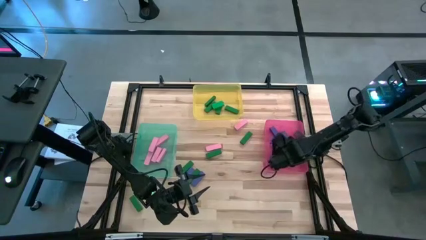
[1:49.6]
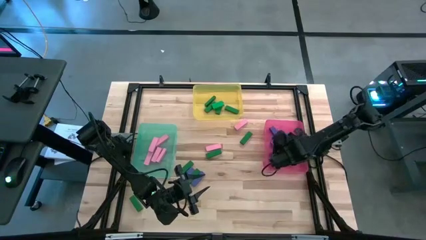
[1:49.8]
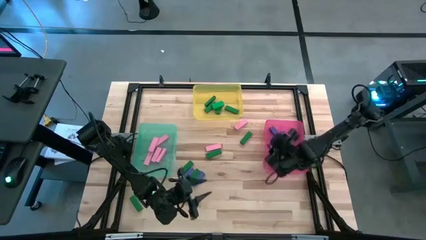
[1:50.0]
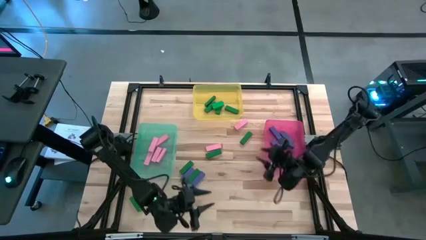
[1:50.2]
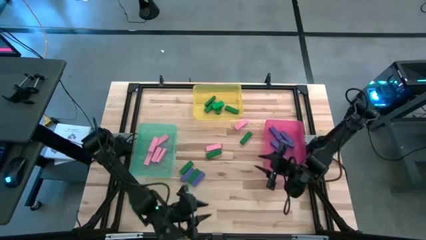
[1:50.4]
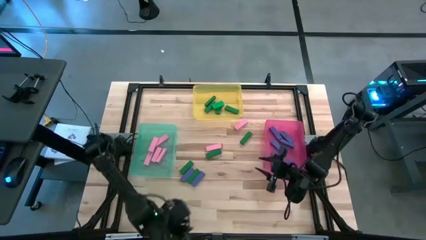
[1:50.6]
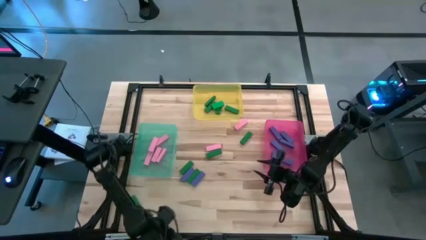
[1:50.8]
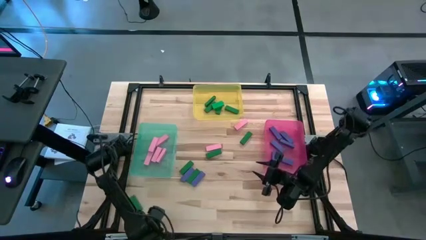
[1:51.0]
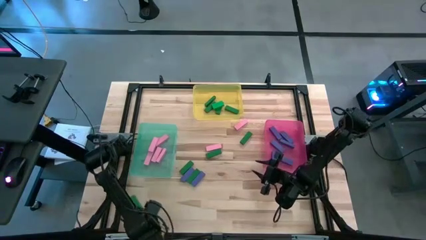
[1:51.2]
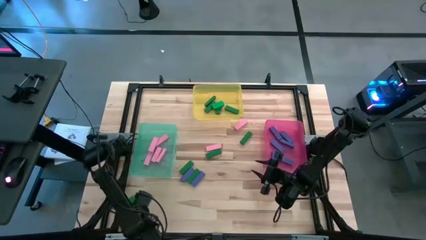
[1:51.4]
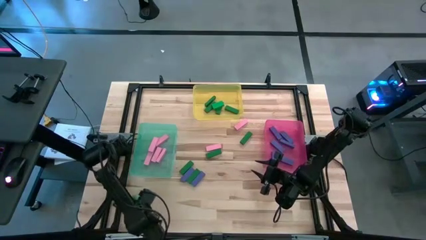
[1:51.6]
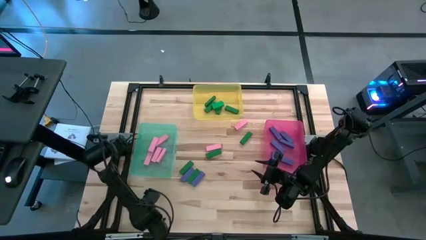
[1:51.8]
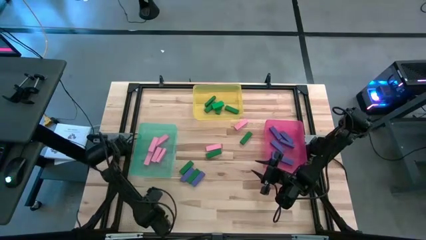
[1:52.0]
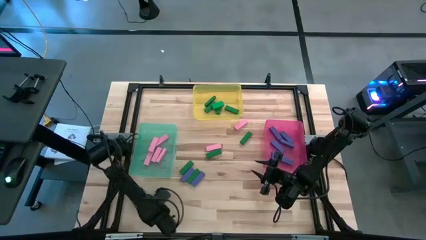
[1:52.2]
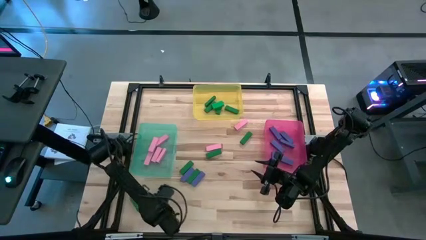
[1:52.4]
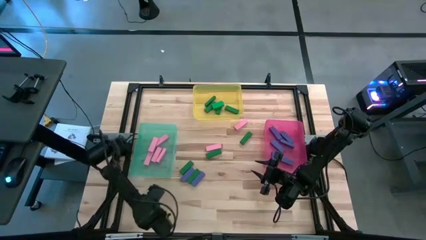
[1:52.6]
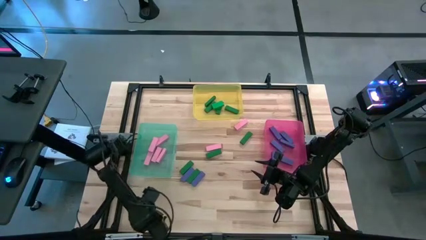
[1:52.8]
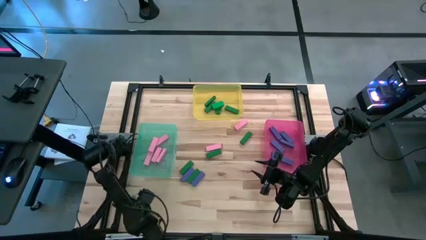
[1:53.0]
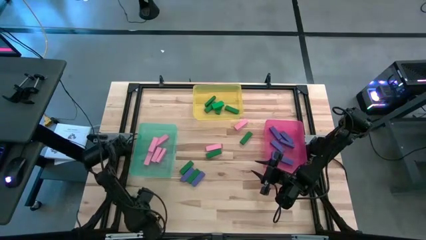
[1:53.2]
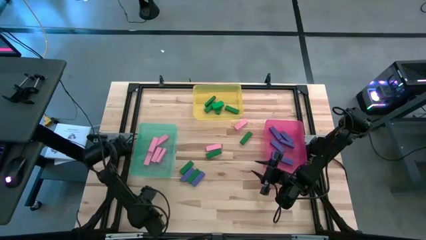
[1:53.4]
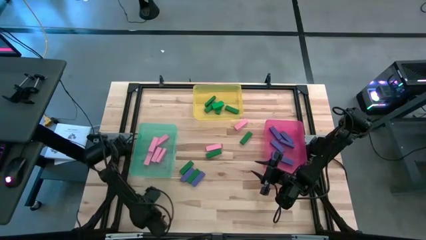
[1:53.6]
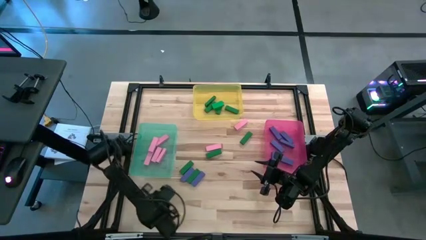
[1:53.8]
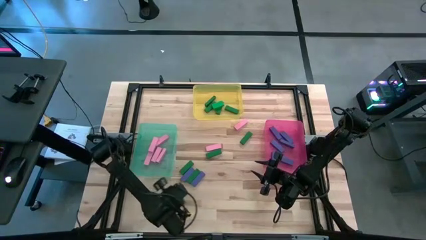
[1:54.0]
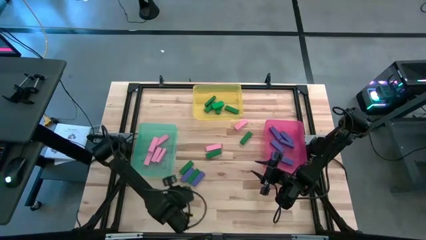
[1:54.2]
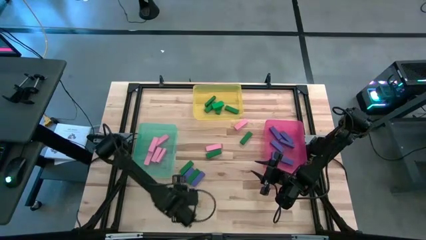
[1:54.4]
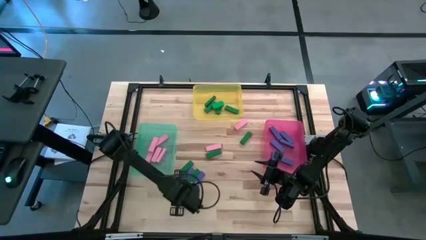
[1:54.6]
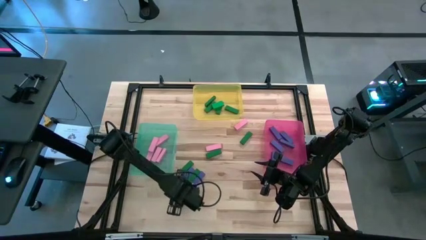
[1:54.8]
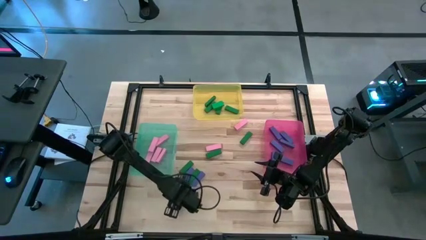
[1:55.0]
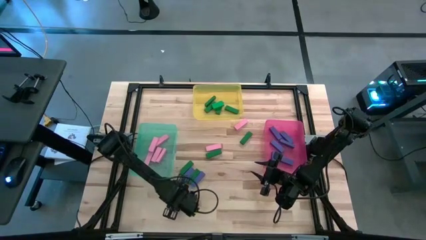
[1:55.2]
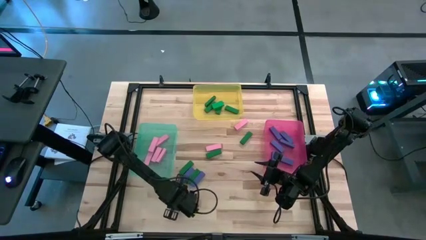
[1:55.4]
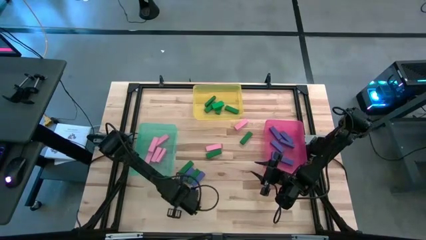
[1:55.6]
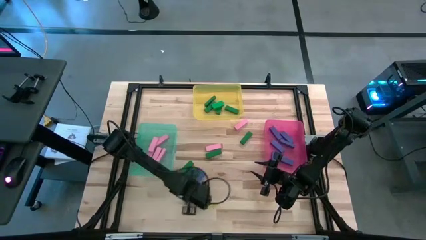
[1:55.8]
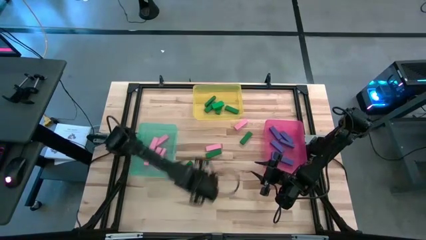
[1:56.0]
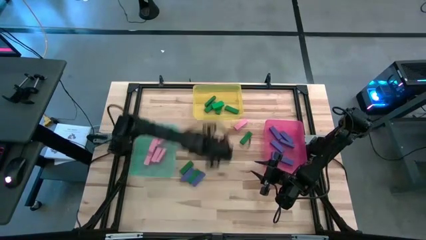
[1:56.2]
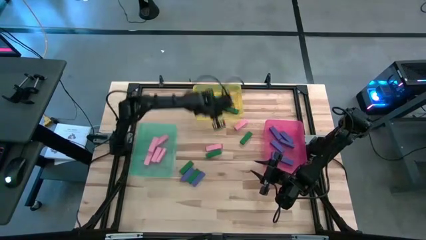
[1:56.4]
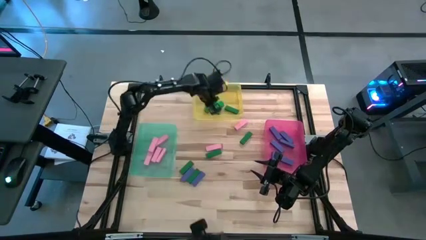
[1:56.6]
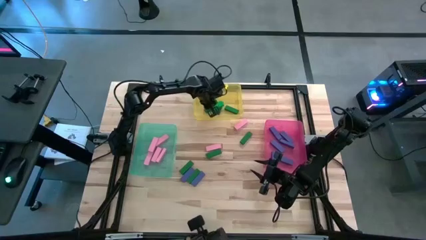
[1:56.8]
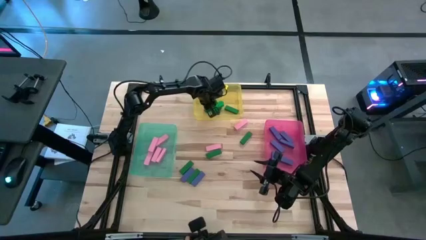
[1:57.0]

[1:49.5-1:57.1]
Task: Sort blocks
Put the green block into the yellow bin

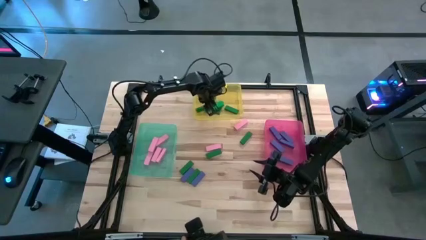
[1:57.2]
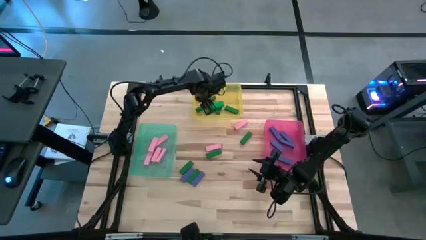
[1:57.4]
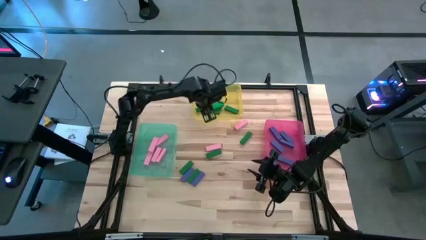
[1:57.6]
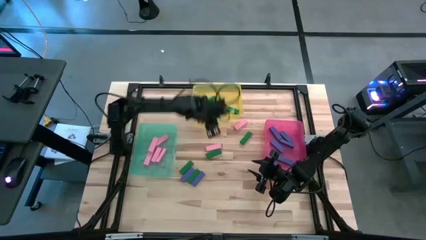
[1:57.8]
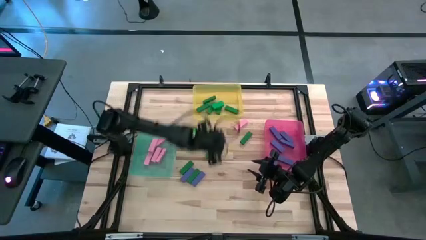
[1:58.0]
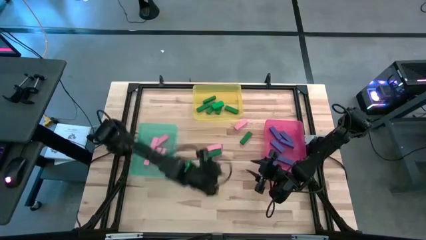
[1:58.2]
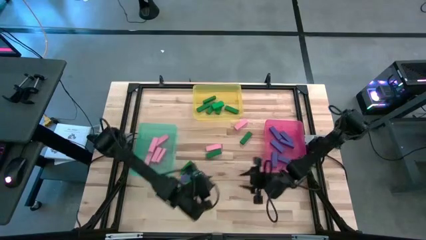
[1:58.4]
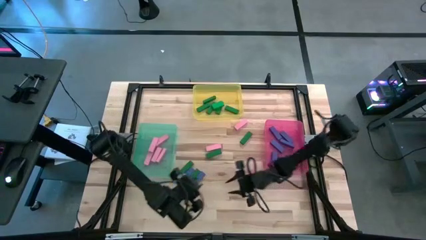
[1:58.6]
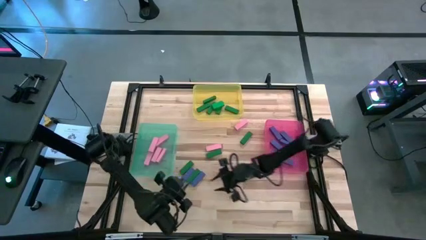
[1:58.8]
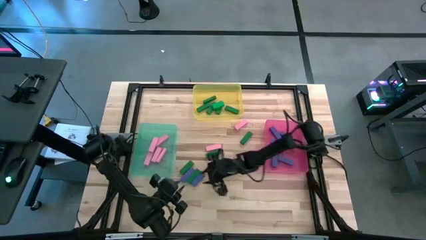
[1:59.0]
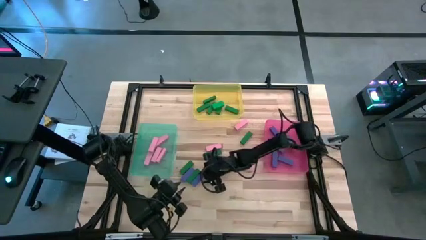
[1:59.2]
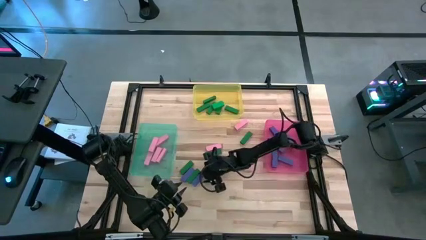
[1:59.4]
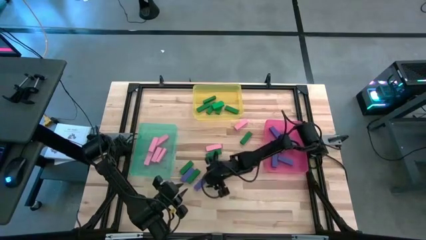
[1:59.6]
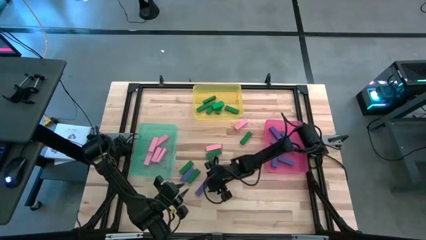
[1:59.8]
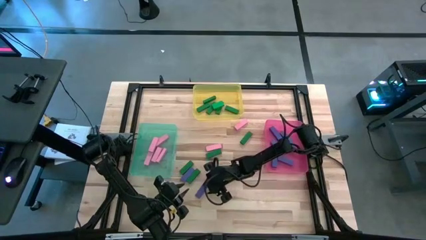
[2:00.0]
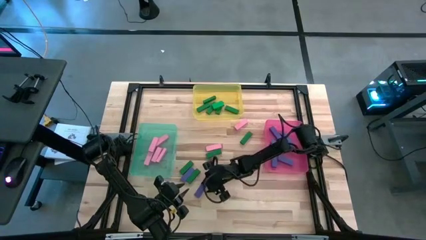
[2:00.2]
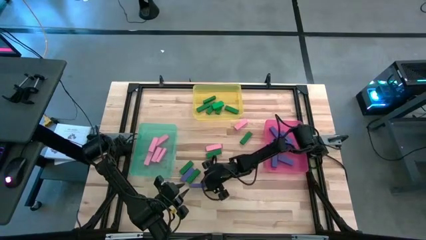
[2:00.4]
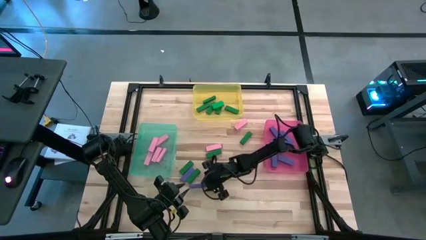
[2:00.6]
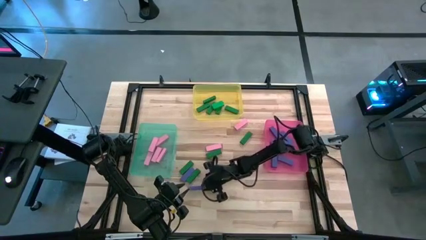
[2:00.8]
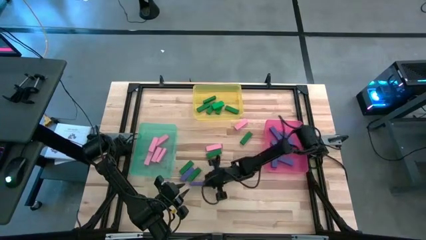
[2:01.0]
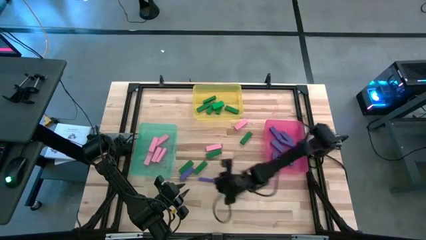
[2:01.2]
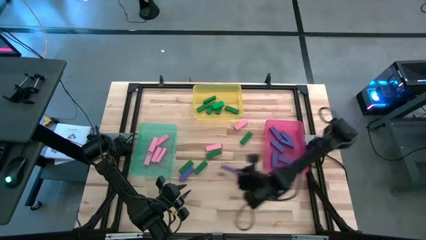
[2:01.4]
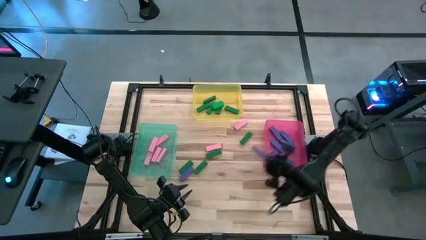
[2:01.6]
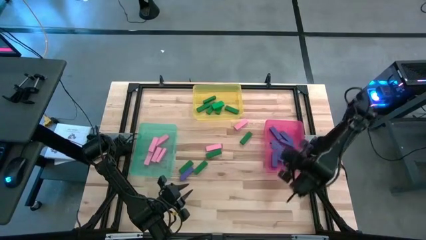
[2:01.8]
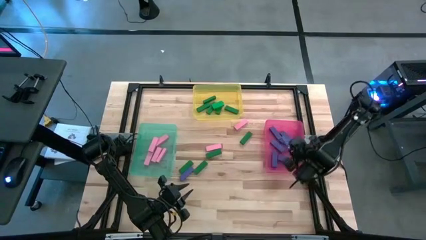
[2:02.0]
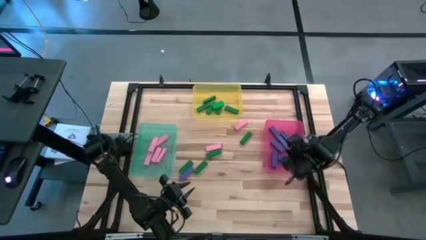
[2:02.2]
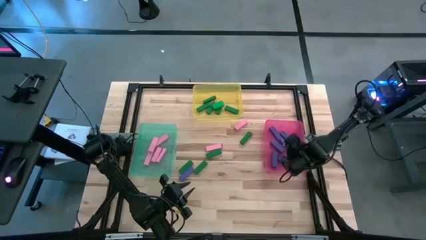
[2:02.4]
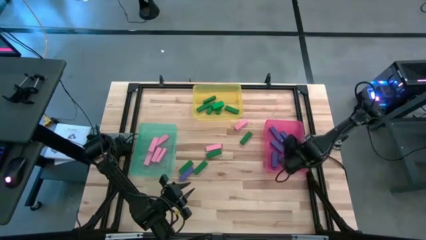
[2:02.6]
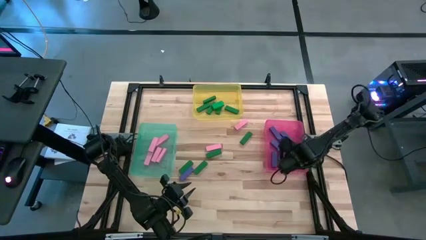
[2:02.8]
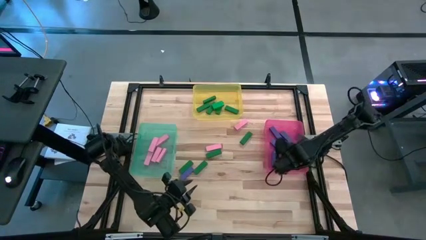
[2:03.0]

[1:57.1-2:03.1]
Put the blue block into the pink bin

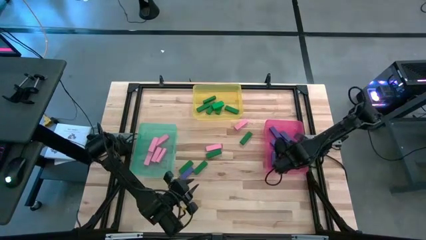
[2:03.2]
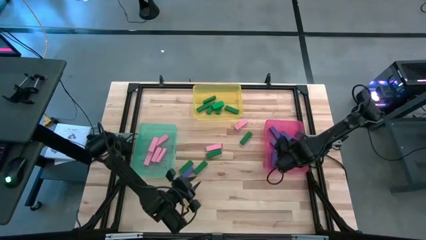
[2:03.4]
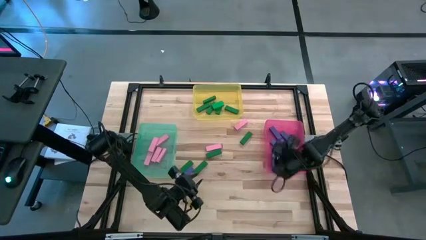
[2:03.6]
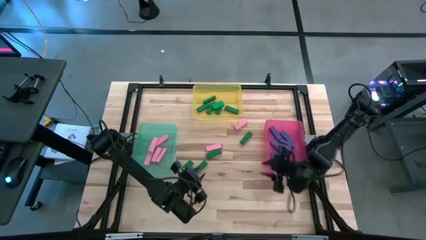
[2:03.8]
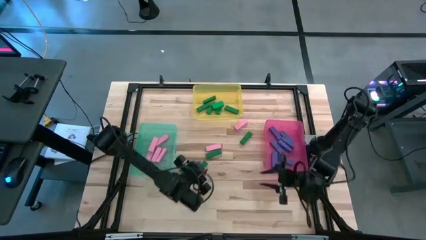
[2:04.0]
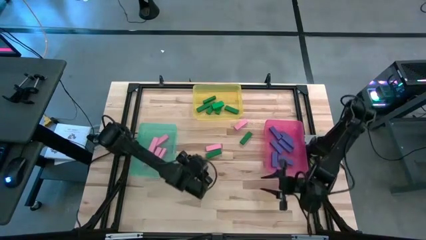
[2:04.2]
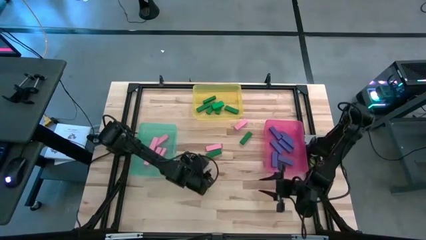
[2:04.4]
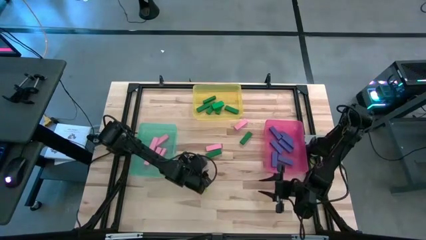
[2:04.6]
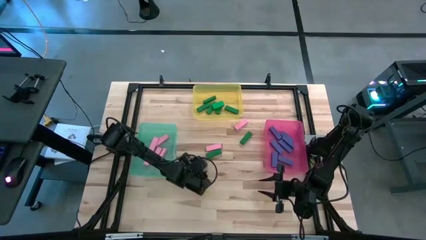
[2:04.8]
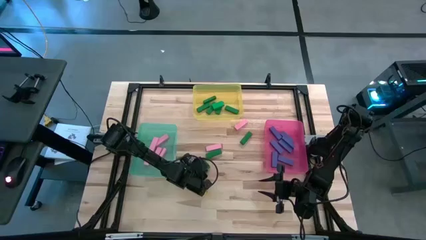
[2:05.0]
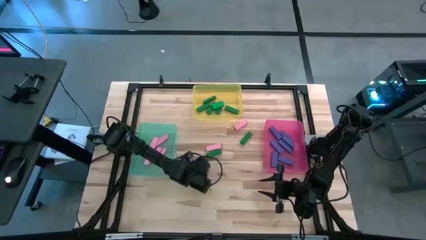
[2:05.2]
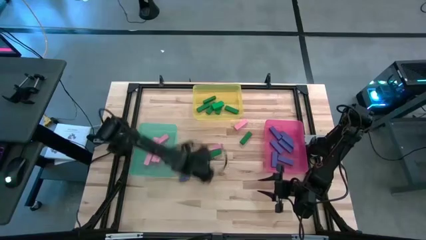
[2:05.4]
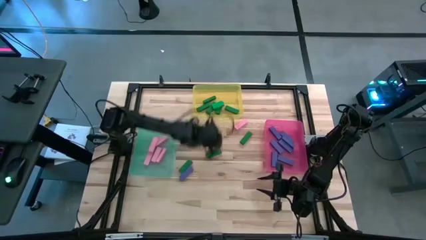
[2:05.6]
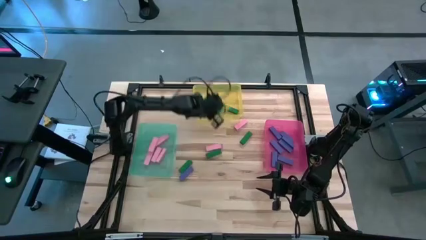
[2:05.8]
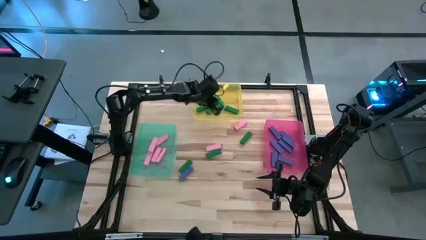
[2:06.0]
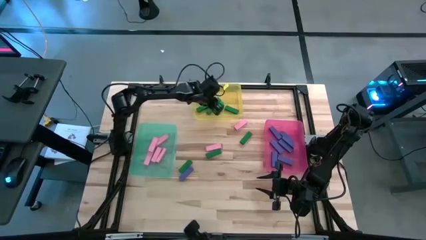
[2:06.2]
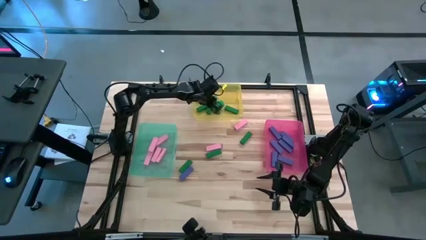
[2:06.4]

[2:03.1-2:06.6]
Put the green block into the yellow bin
